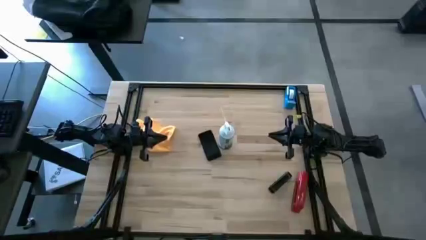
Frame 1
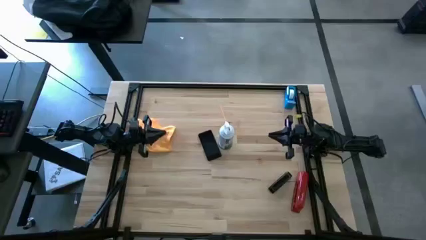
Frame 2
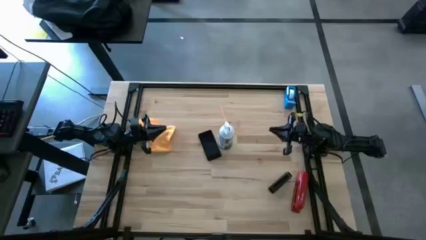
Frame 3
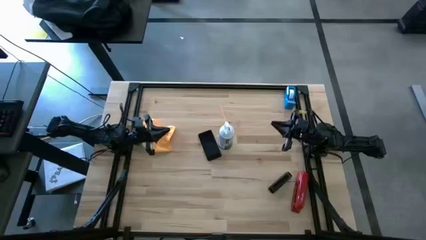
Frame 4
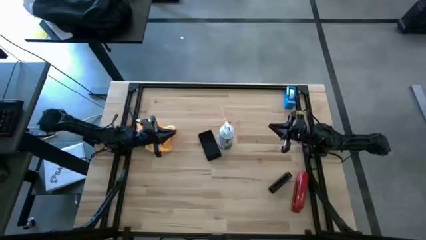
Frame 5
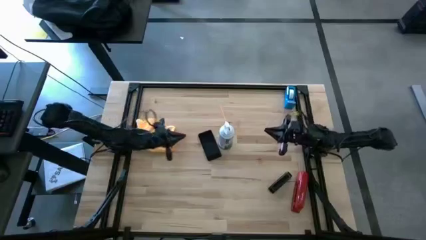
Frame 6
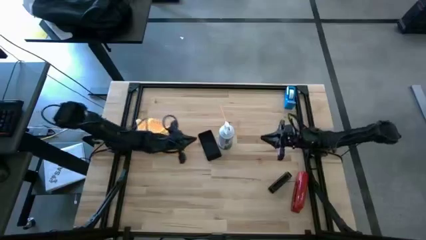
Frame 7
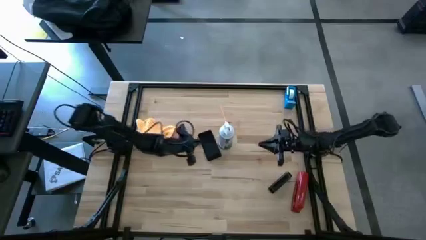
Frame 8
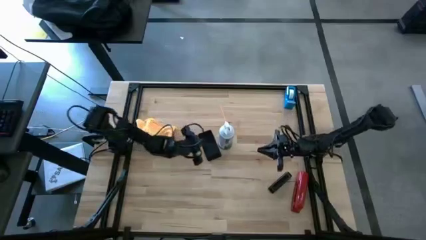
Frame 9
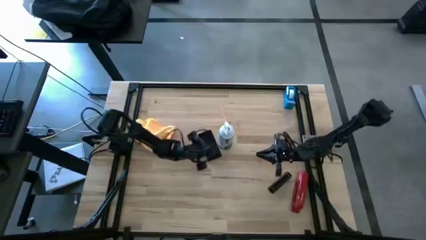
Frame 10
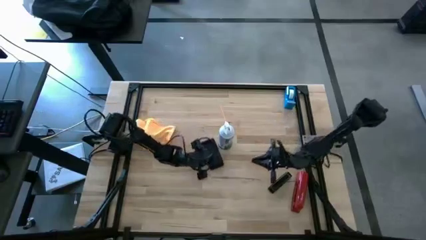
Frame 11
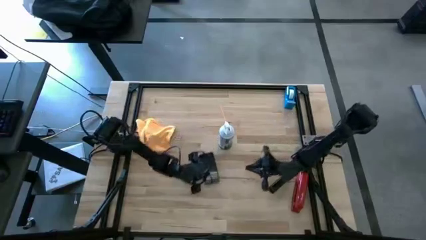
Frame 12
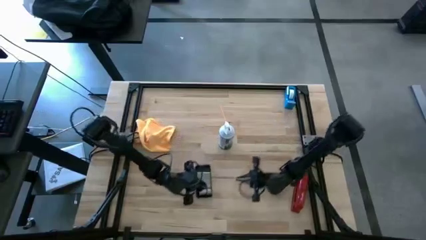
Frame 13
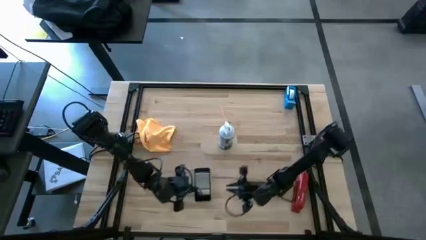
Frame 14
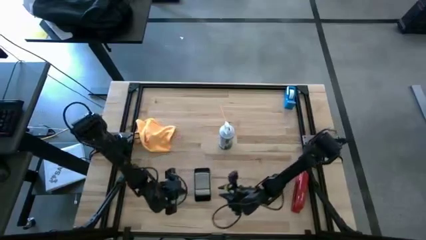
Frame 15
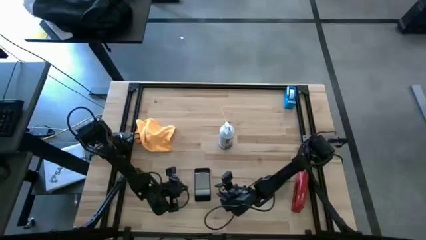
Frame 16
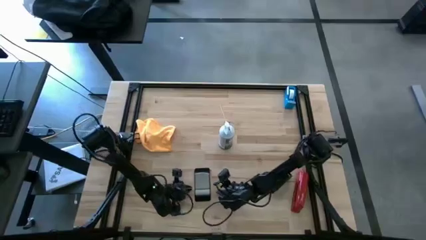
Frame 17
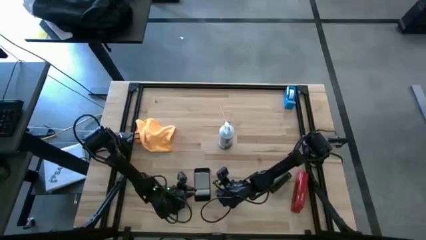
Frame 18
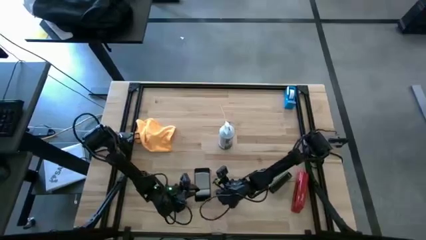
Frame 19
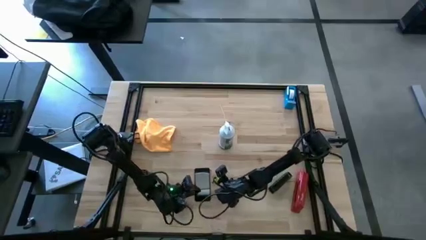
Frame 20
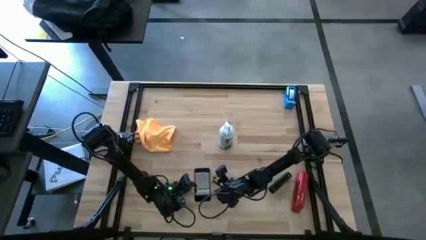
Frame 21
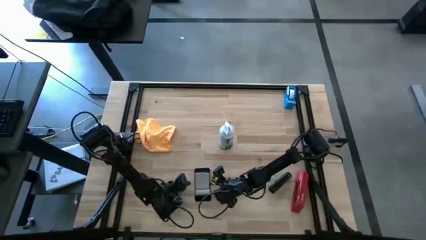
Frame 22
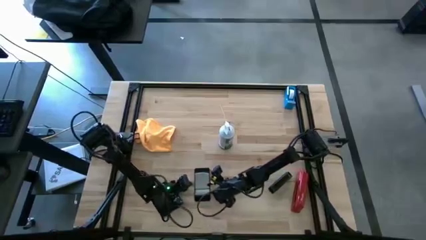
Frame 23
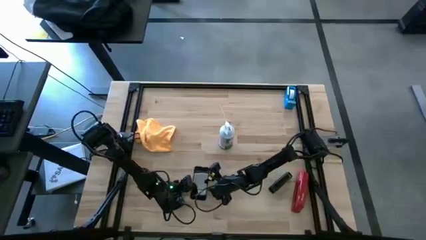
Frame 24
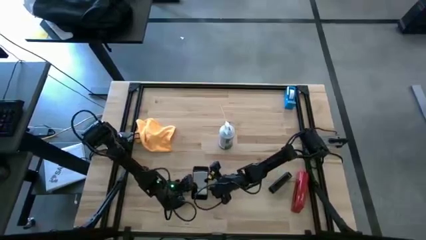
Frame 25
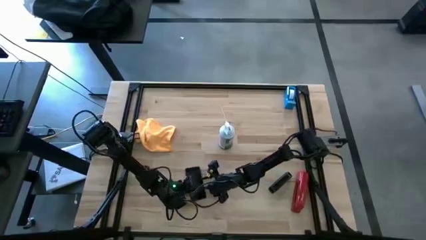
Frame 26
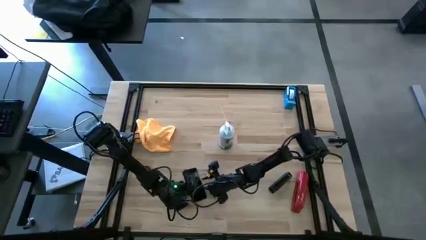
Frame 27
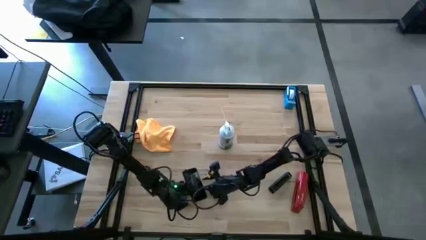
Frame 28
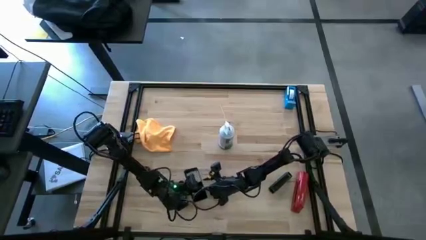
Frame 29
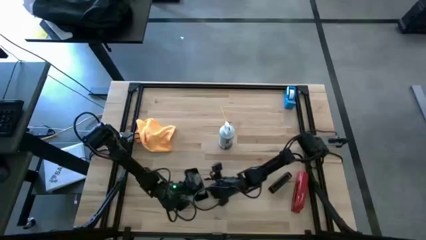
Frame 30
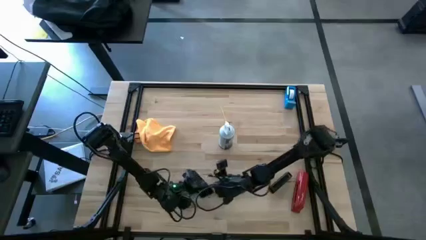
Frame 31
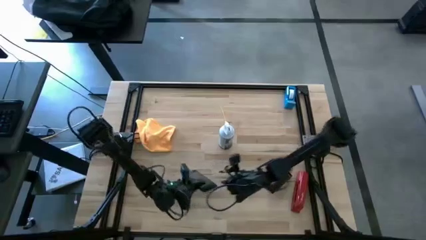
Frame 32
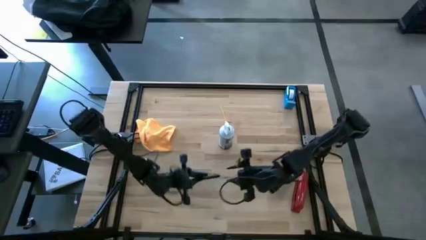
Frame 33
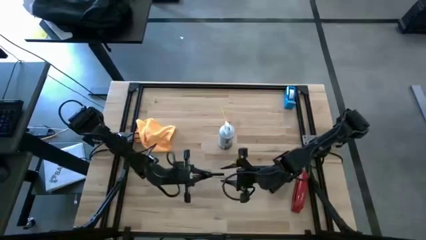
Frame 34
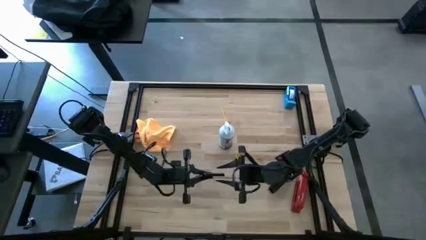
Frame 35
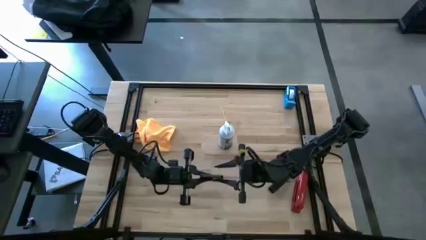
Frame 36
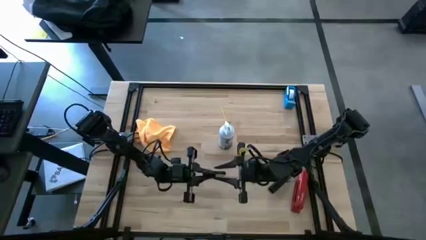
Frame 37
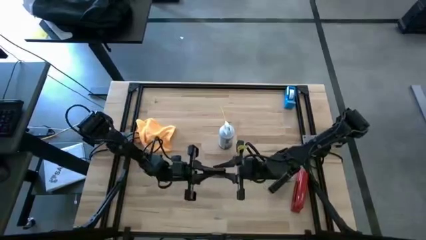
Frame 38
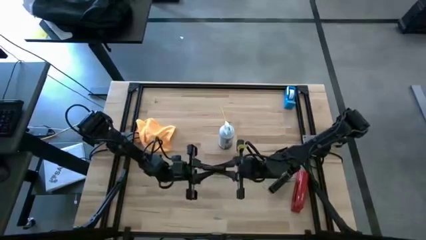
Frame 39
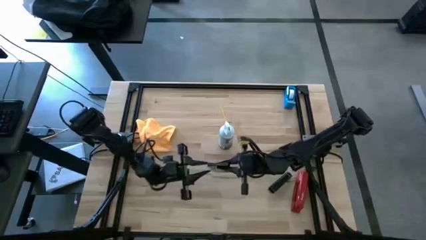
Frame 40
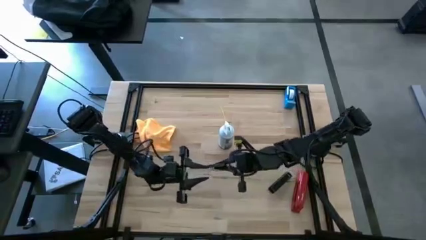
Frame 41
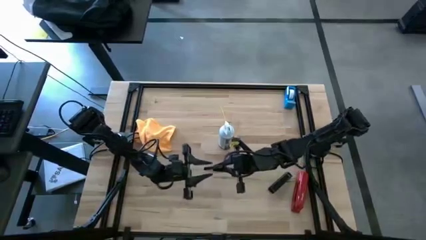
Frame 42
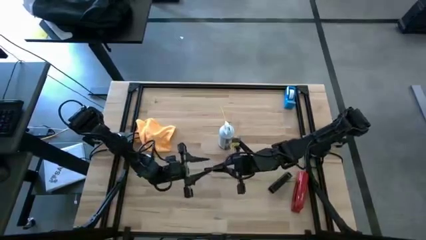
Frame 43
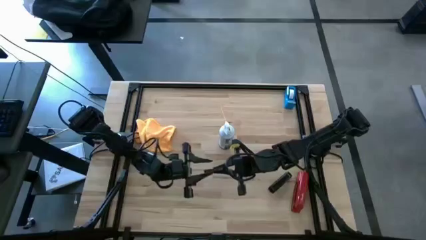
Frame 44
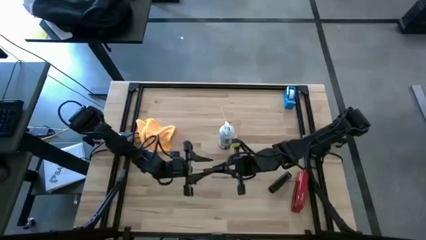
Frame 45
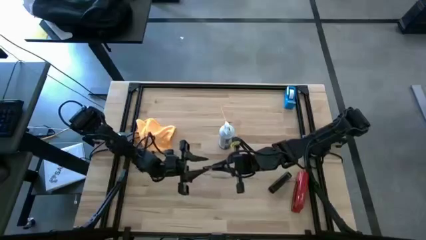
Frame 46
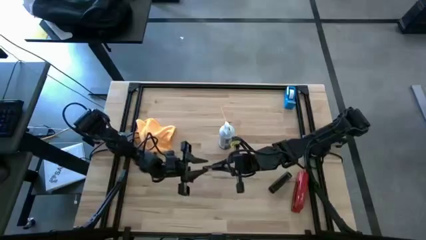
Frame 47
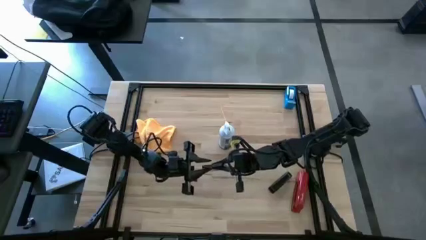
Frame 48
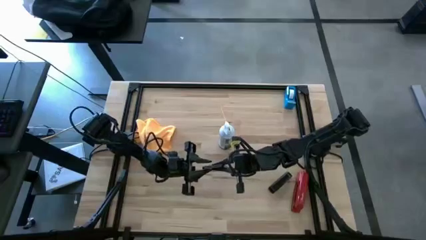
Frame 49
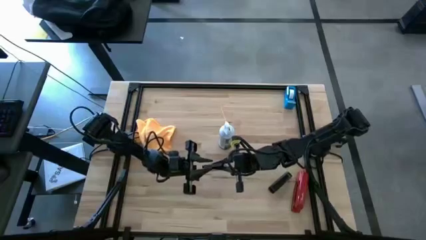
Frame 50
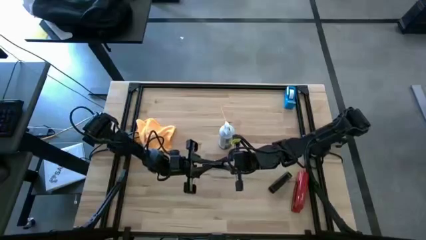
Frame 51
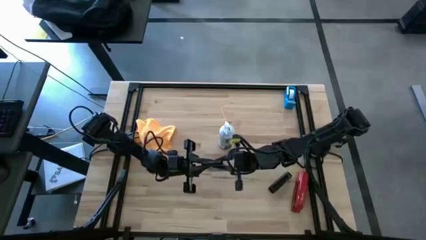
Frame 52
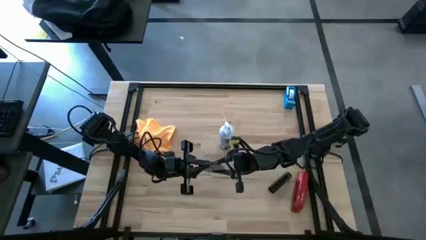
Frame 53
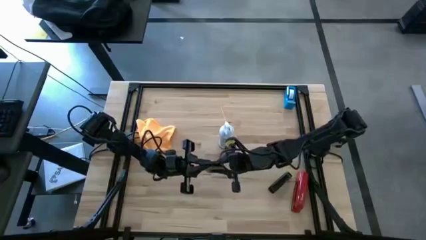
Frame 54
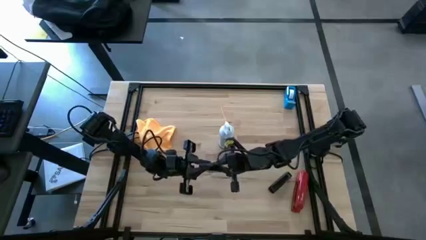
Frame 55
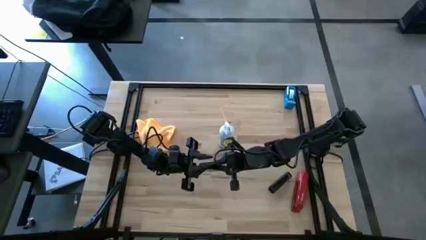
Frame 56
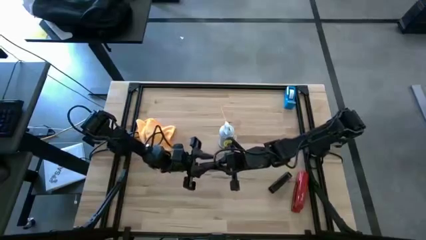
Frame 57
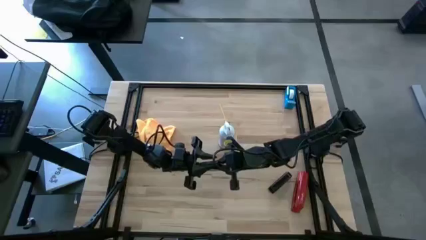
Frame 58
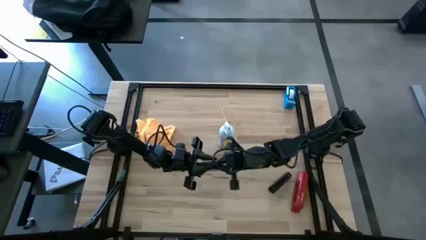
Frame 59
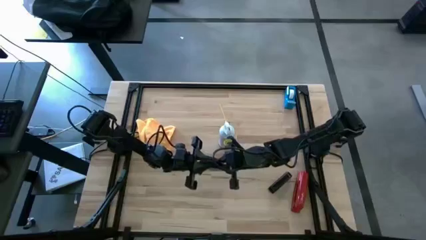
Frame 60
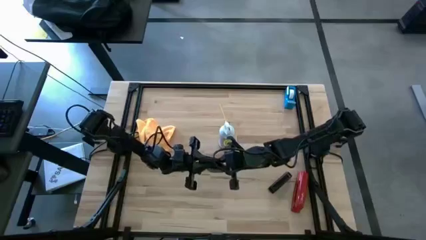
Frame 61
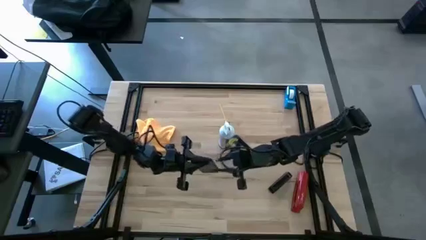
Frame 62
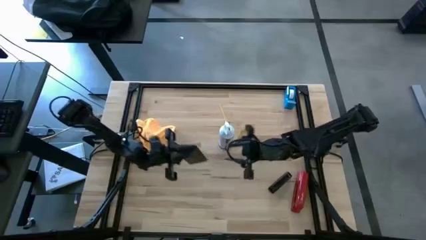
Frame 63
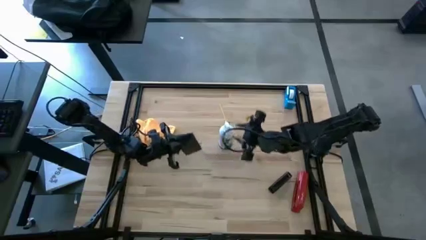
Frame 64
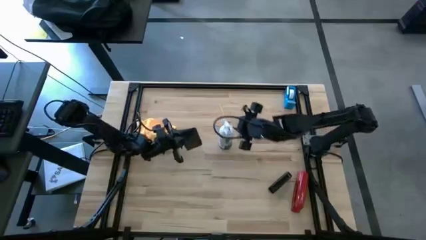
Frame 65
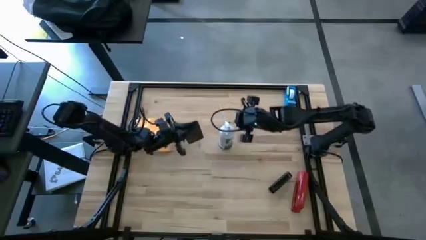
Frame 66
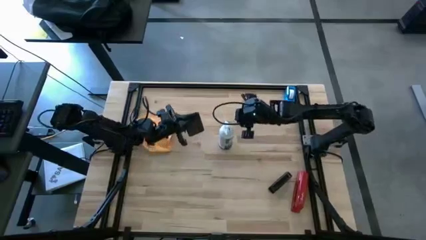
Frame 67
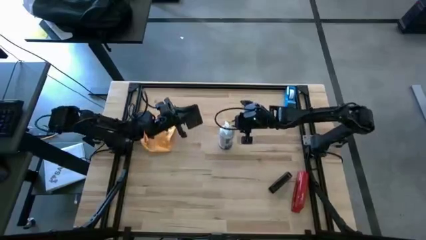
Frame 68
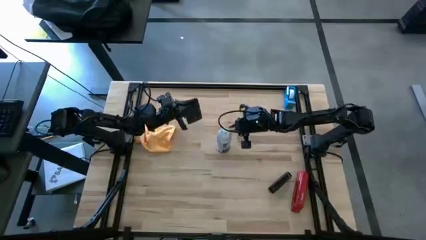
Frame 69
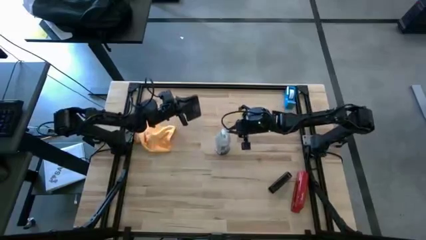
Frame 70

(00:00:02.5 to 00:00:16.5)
Task: Apply microfiber cloth
Spray the front of the cellphone using the white spray bottle
